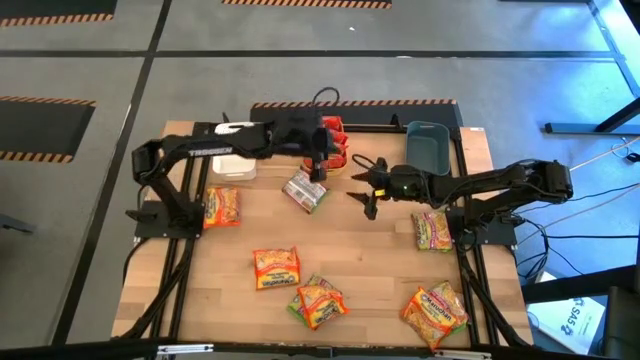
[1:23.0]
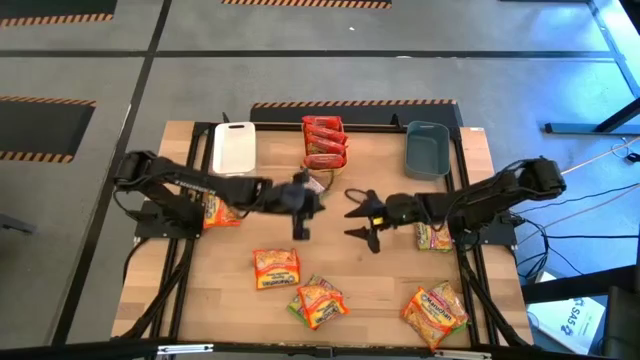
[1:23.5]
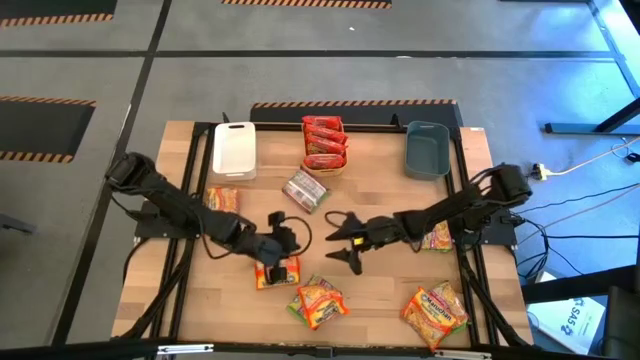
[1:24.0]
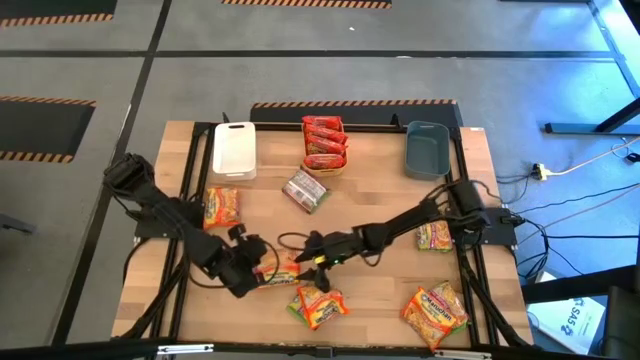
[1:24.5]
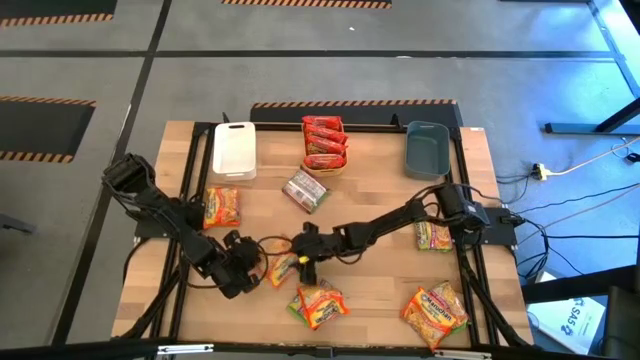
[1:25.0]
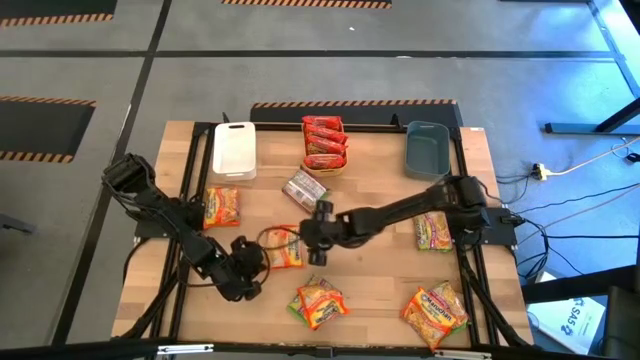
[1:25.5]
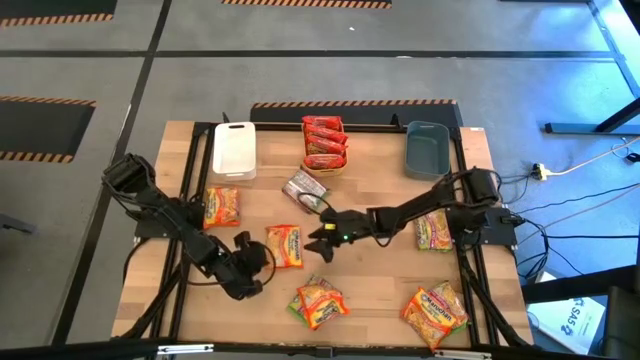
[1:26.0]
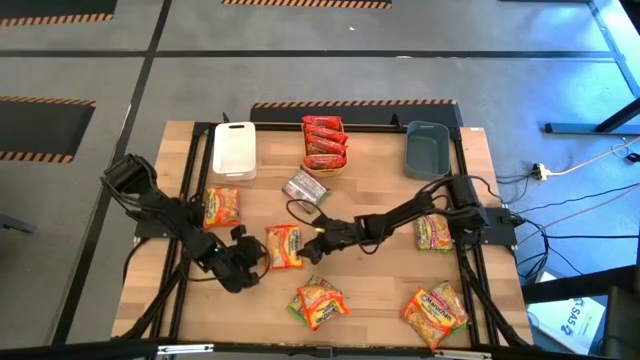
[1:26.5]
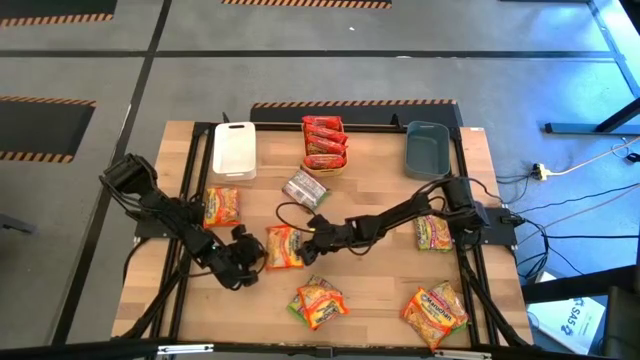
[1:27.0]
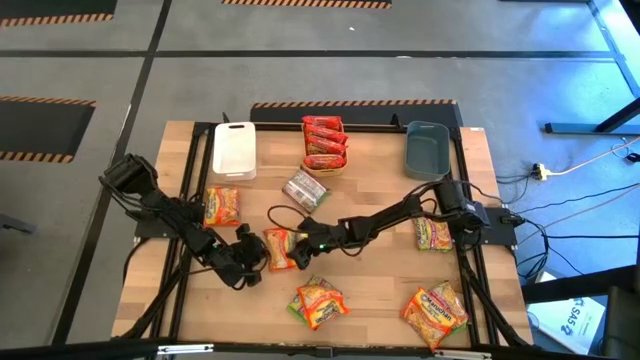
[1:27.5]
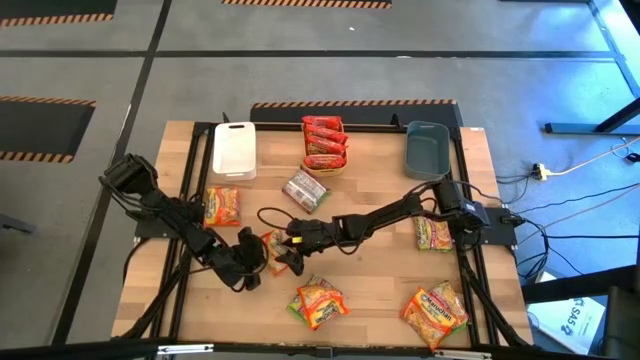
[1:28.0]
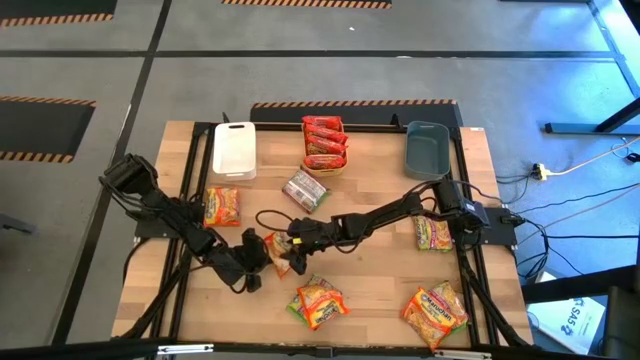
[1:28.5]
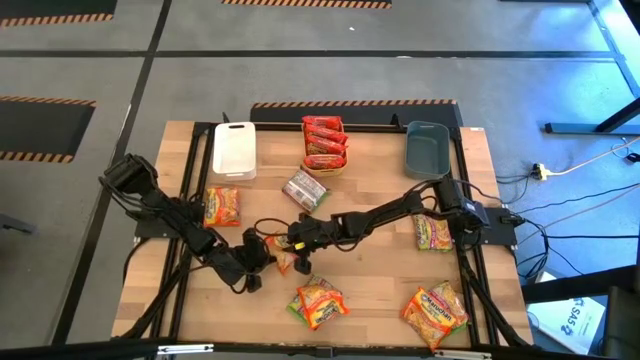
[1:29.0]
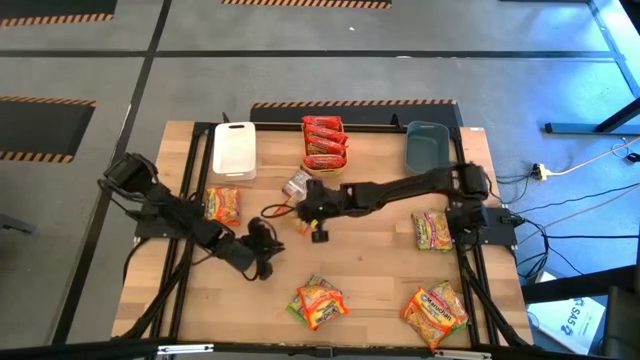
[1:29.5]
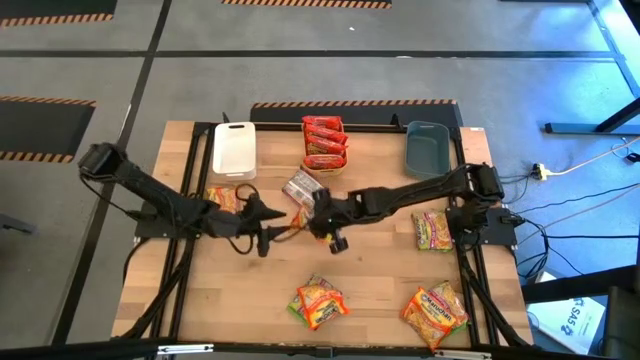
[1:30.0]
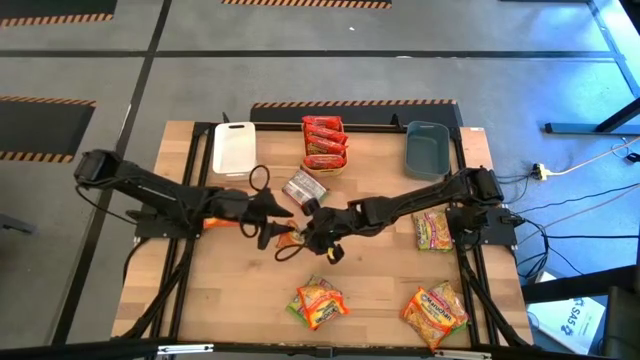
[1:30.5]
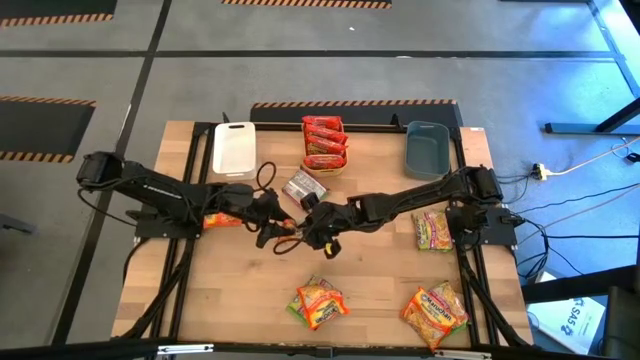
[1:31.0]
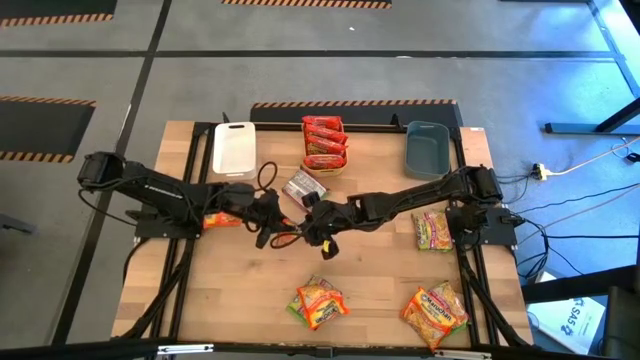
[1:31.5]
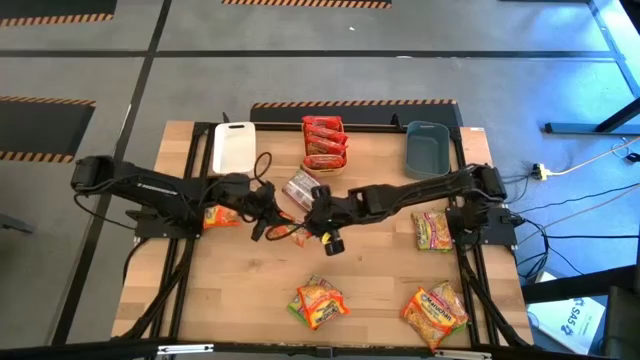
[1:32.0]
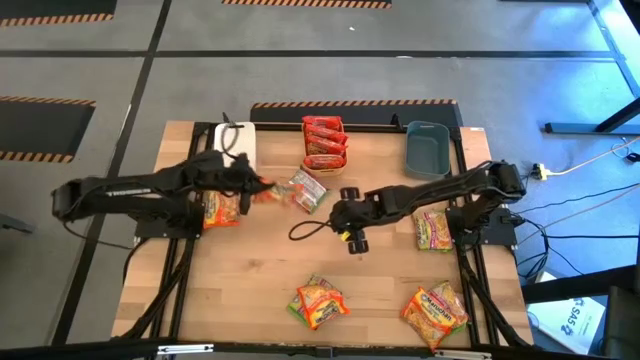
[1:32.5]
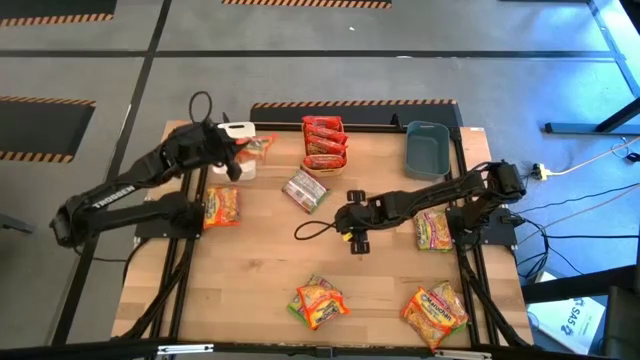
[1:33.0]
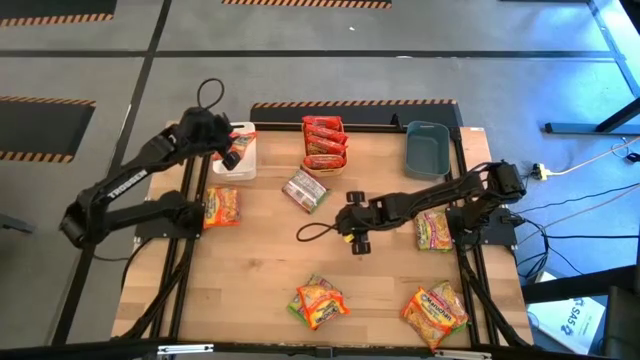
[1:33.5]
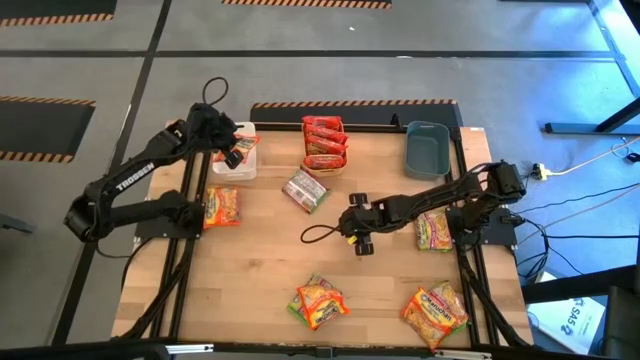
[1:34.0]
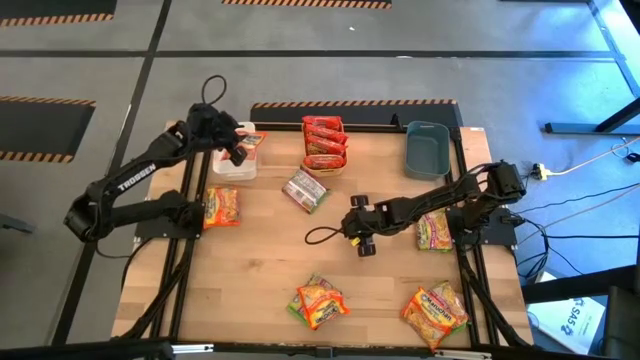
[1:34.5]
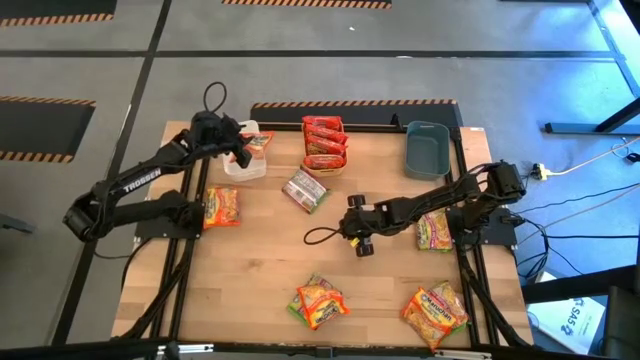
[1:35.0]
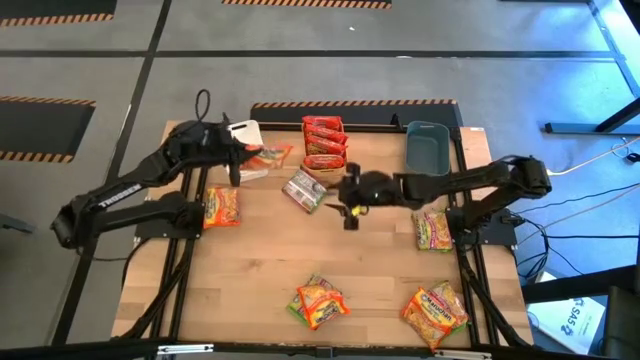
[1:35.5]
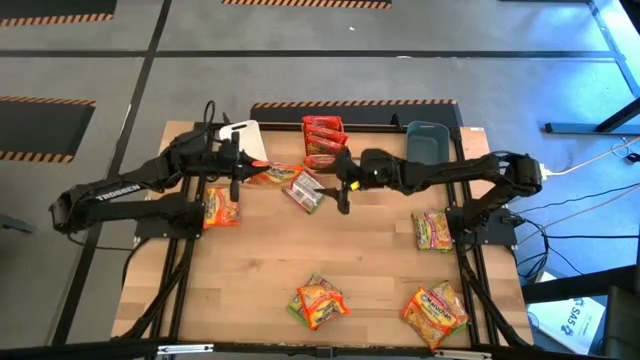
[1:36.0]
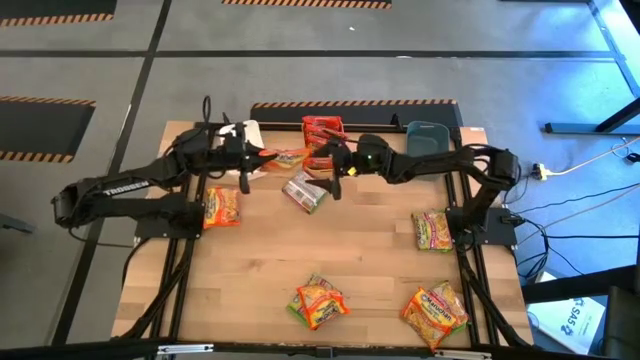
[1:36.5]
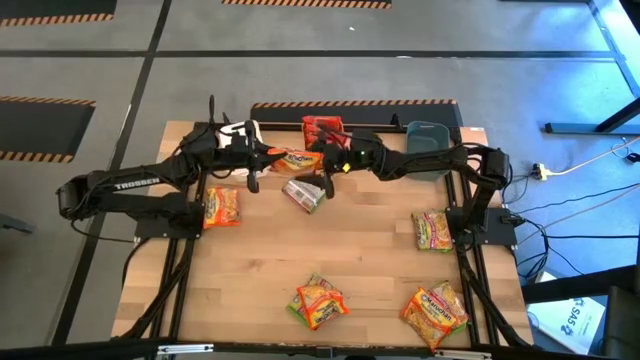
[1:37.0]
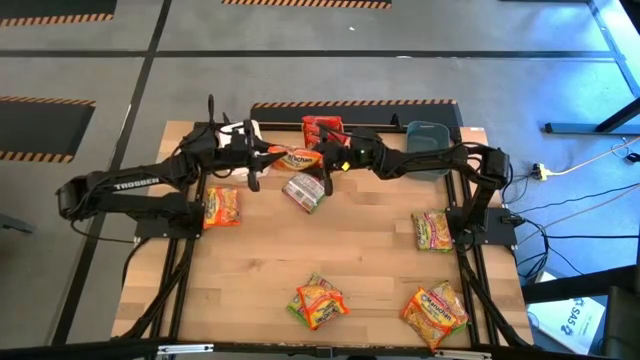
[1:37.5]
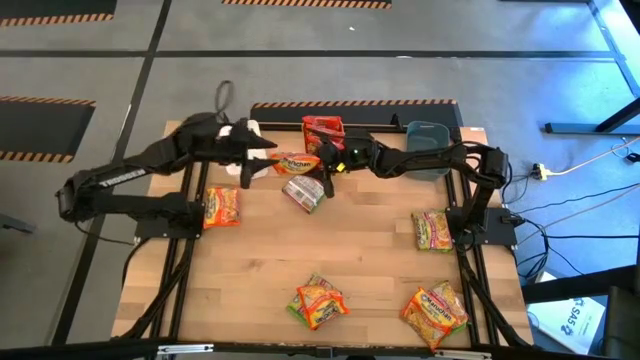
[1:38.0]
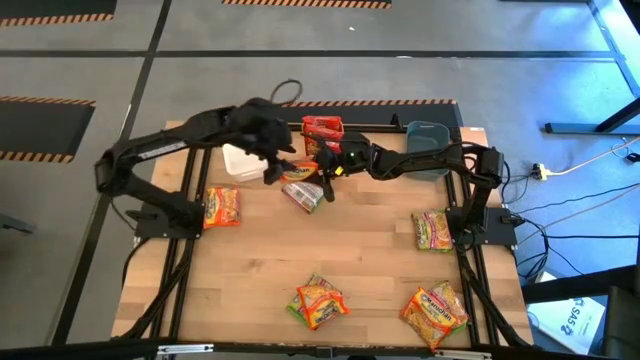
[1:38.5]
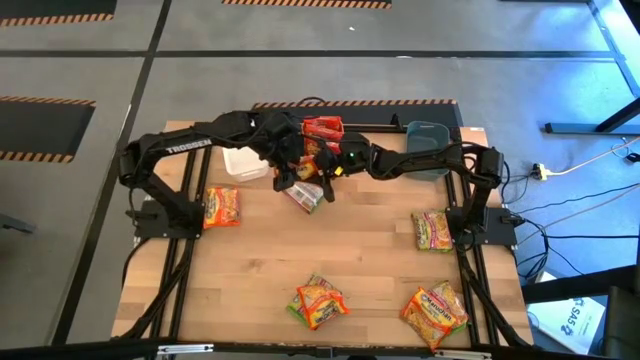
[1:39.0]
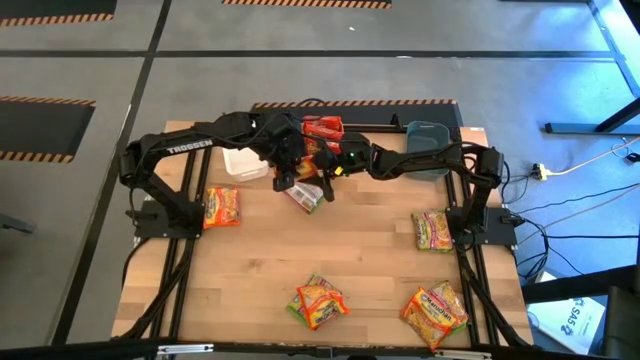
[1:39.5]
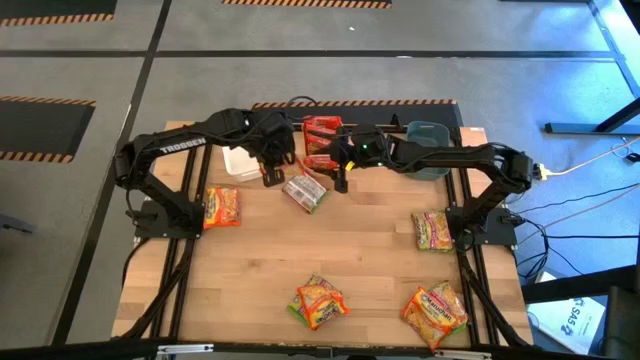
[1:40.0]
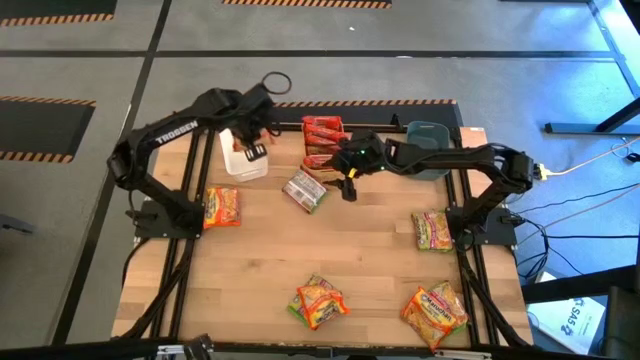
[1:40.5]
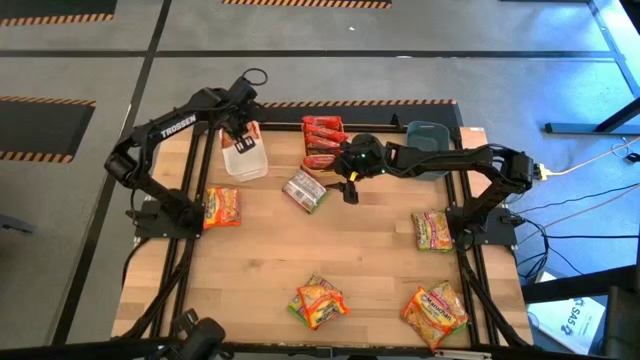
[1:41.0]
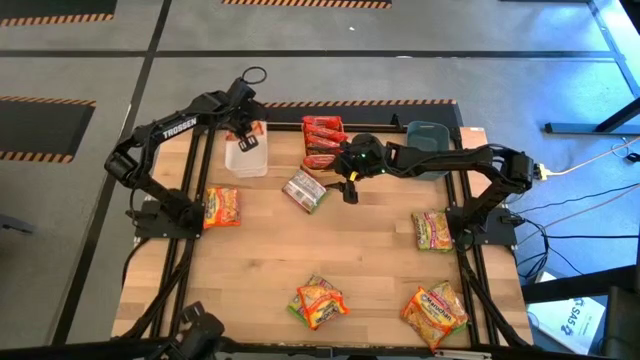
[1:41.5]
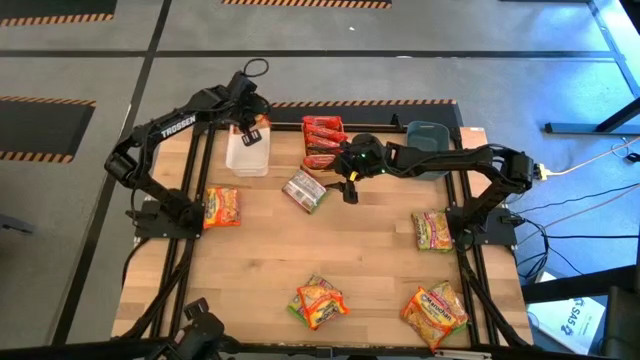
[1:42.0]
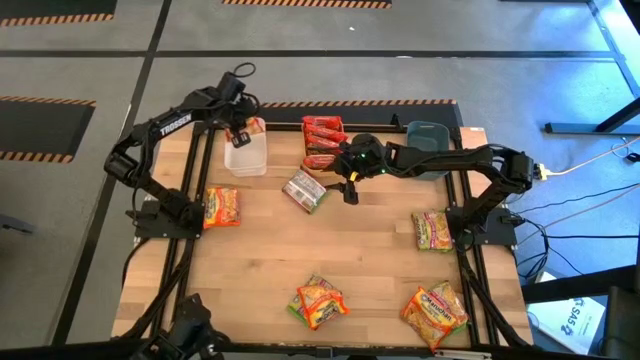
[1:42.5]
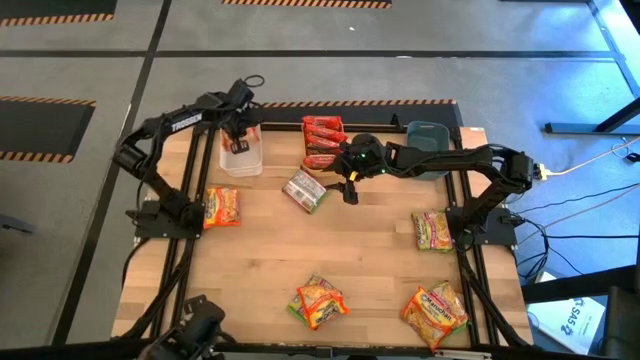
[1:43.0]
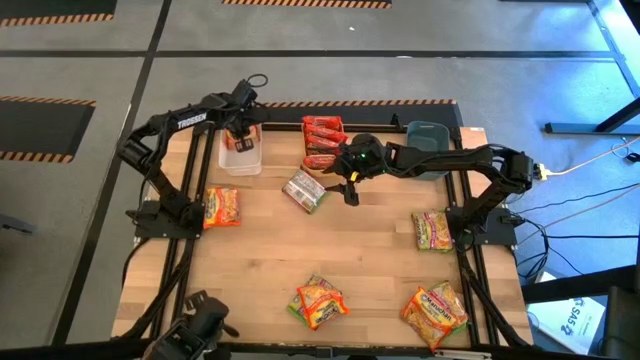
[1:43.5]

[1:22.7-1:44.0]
Task: Sort Maruchan noodles
Put the light orange noodle pack into the white bin

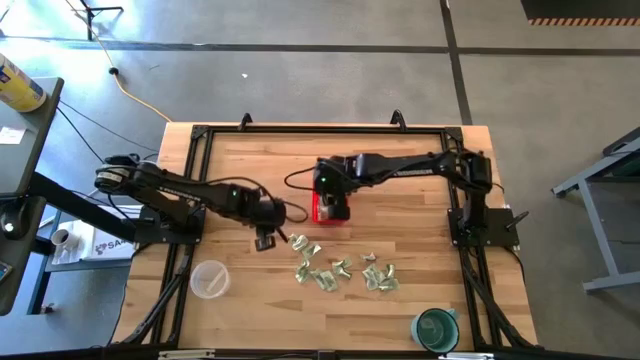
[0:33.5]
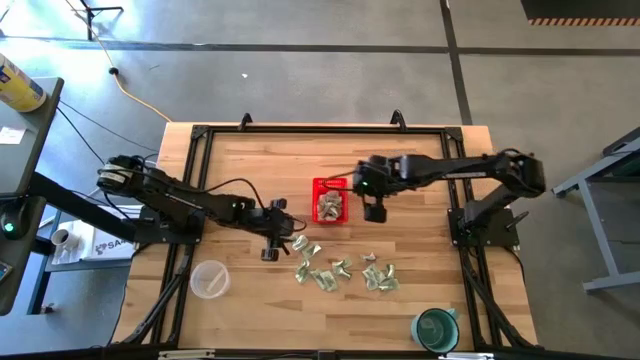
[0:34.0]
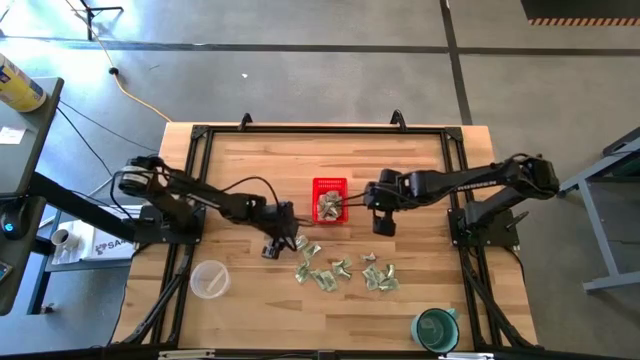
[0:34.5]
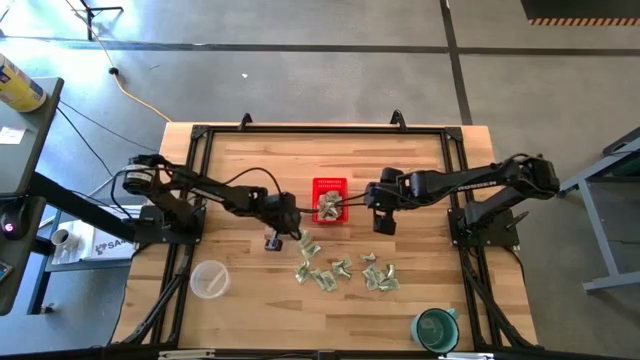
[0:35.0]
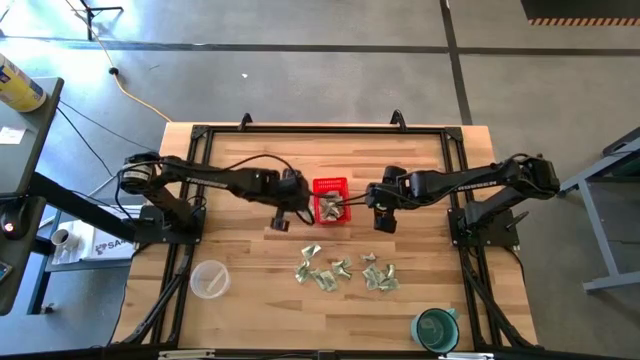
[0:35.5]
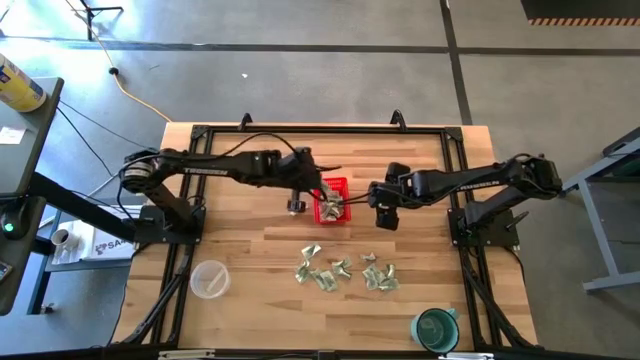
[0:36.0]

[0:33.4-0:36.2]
Task: Pick and place items into bin
Put the light green stevia packet into the red bin
